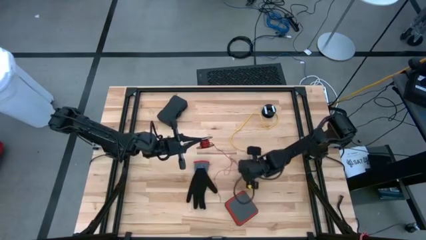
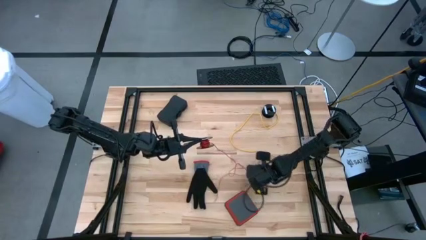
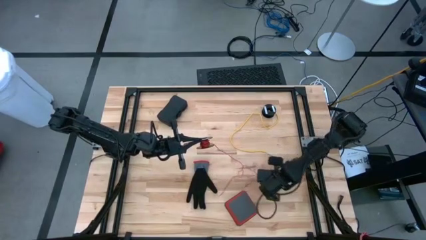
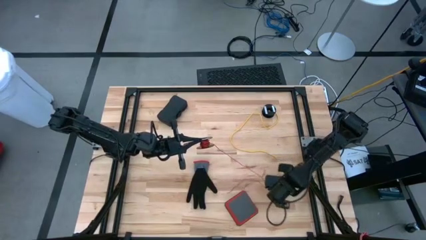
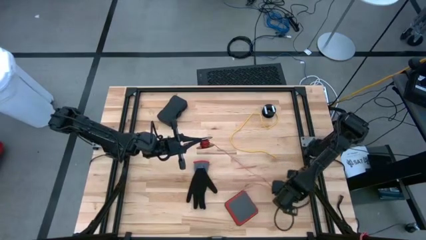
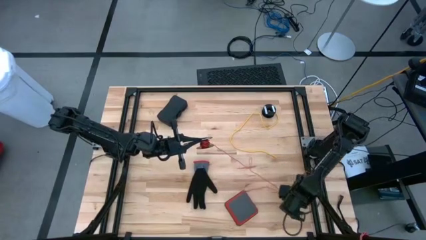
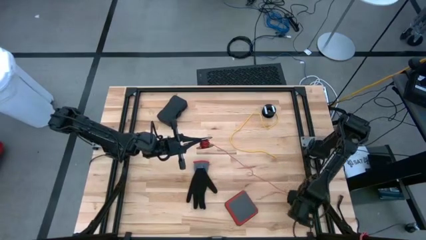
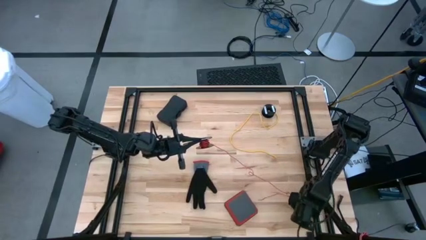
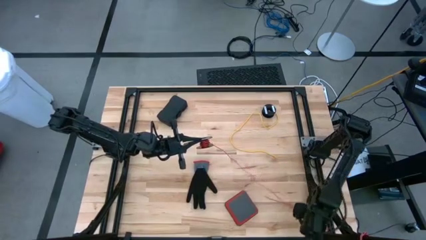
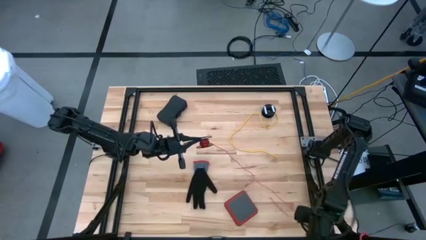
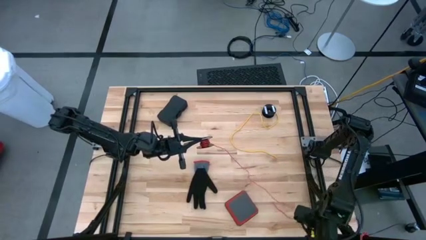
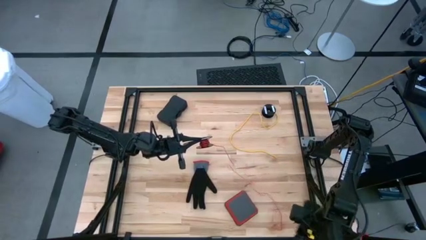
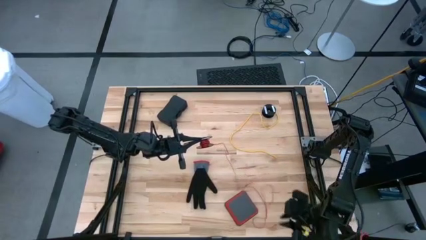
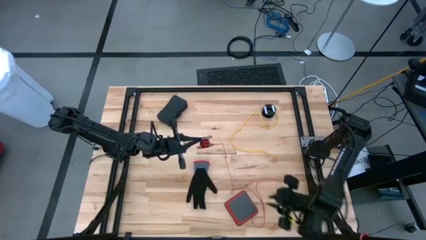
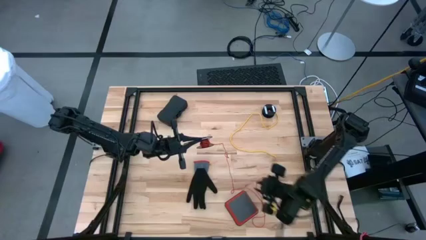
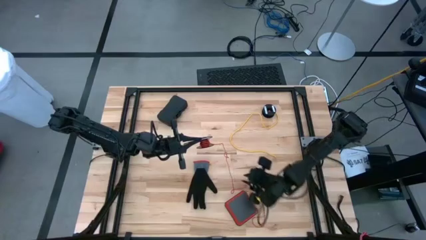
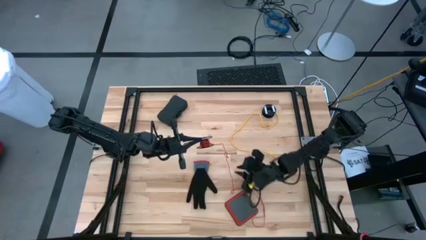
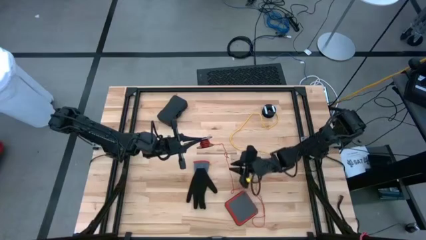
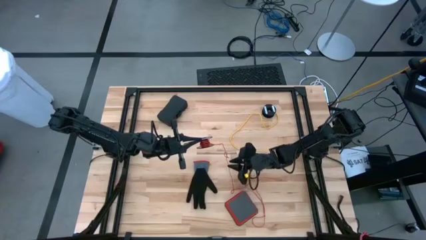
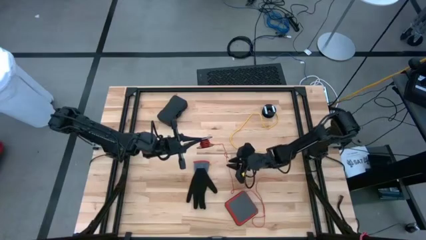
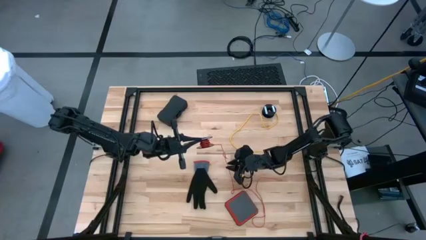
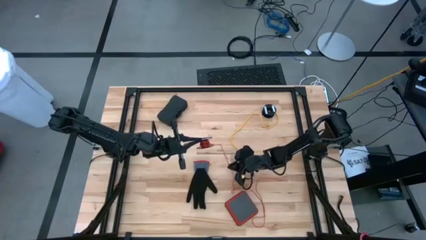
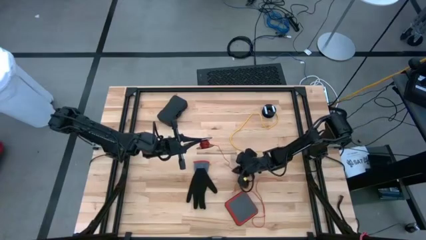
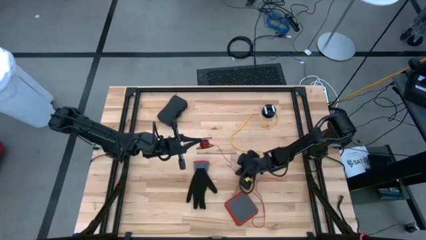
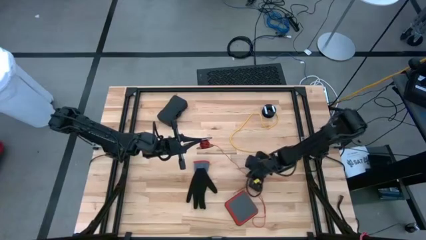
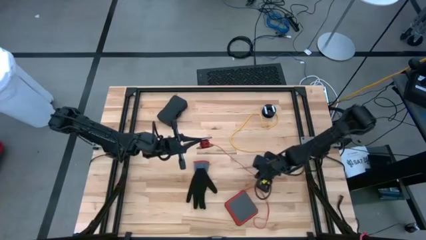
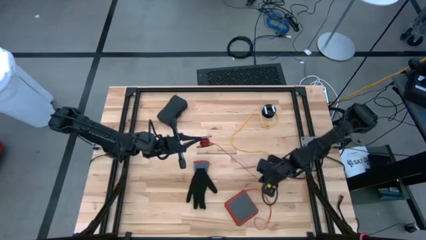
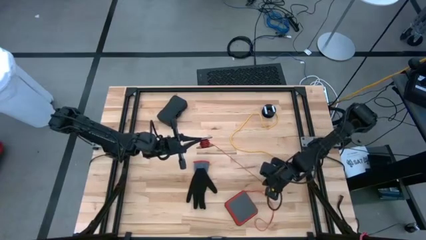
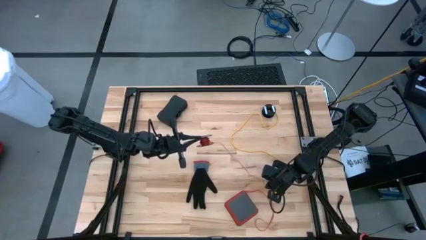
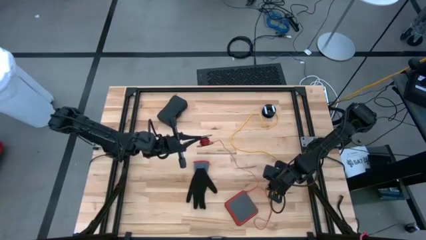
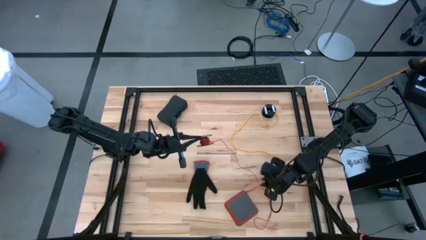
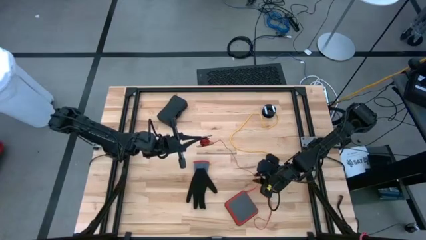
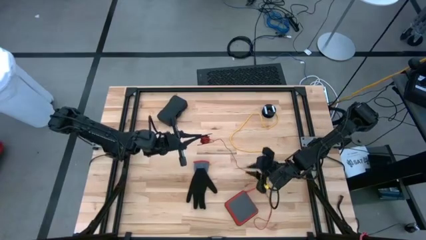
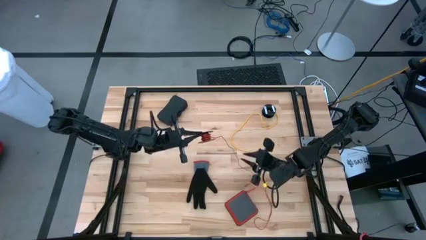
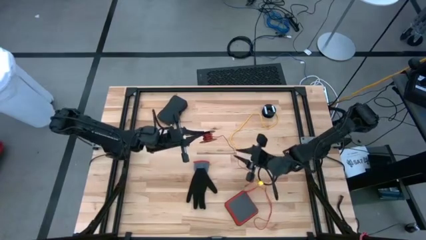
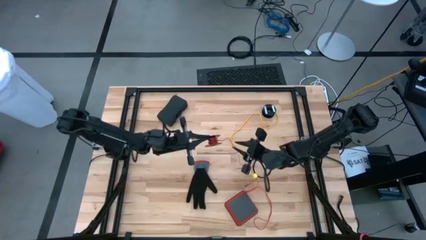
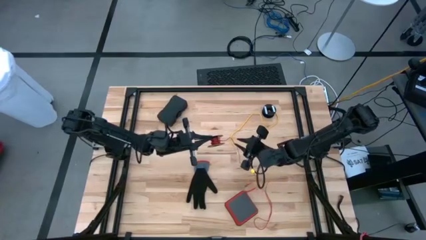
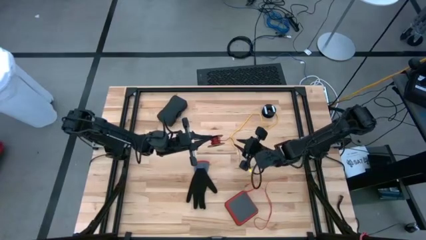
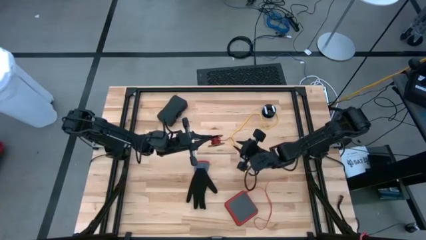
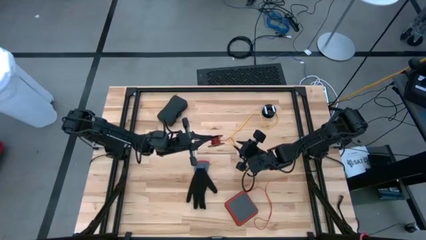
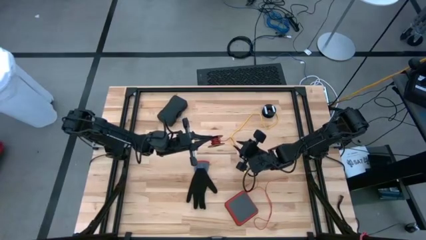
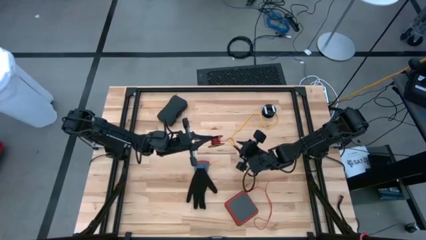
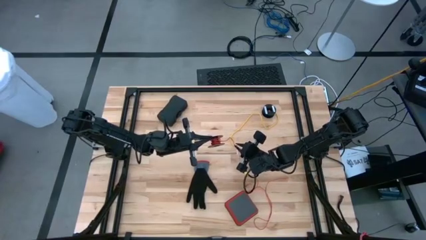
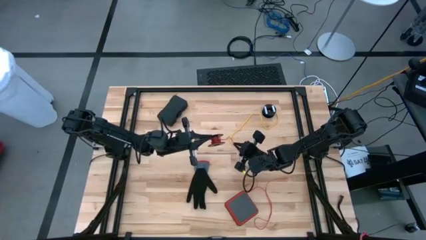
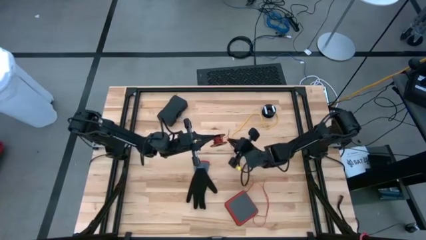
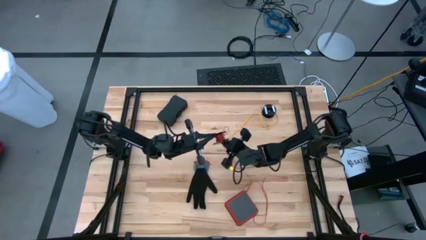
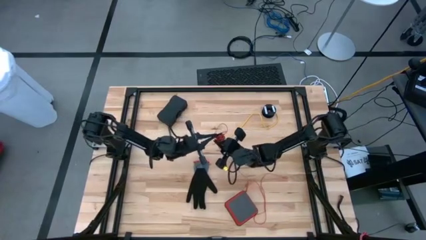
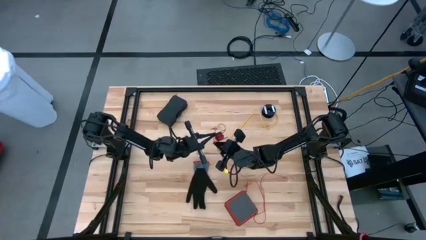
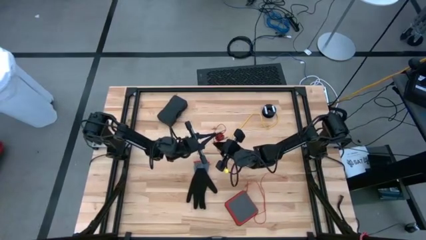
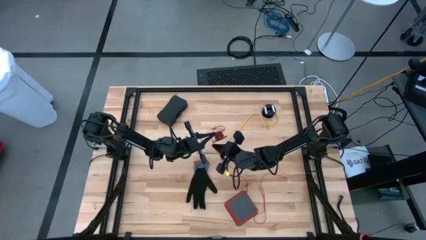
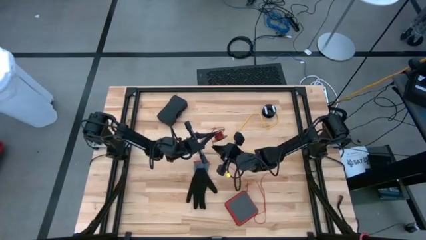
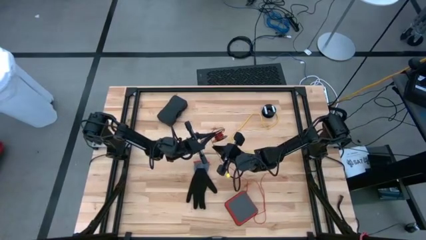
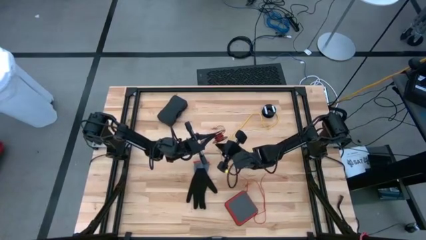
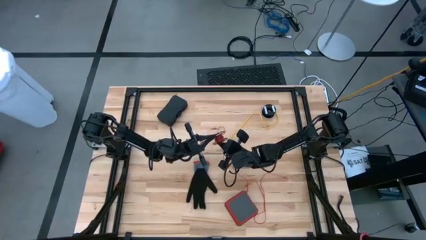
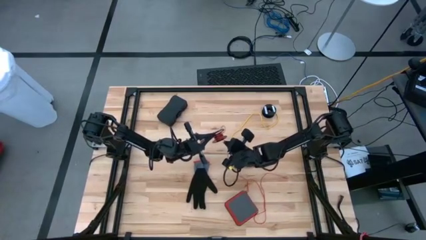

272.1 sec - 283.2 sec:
Task: Coil cords
Coil the red wire onto the black spool

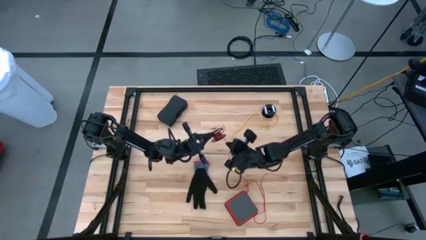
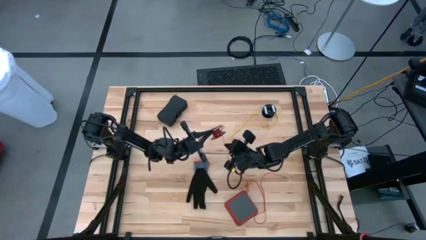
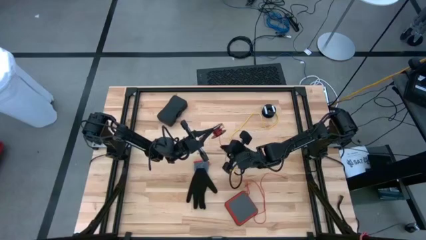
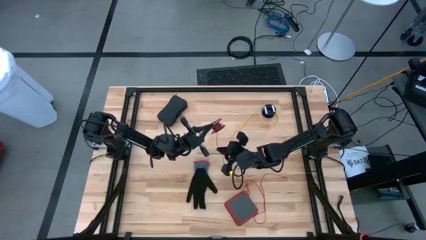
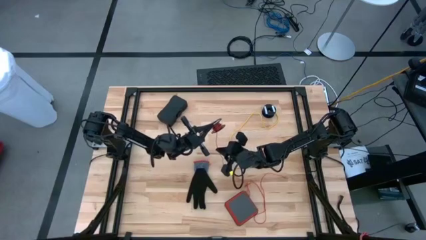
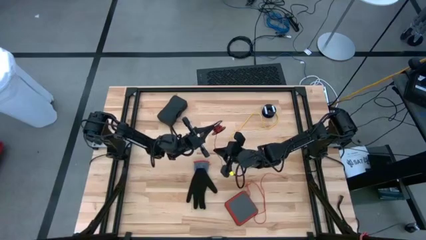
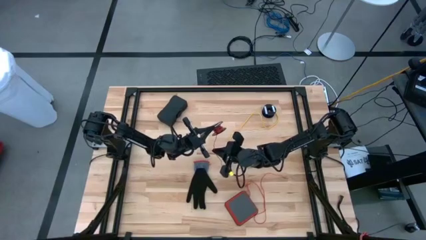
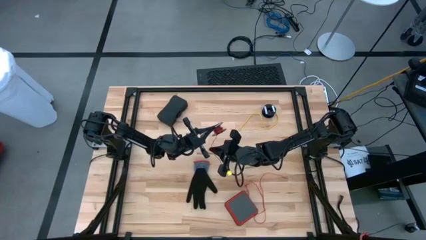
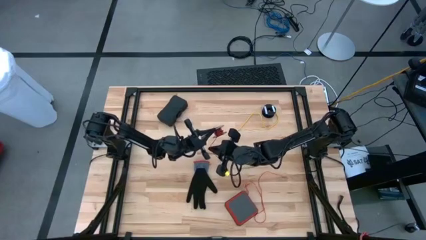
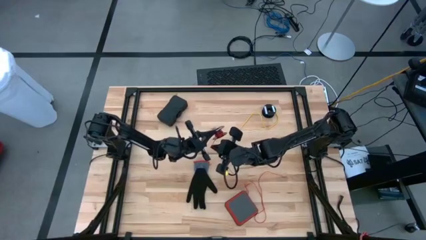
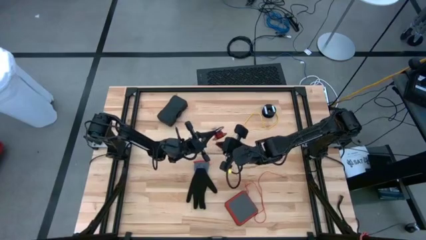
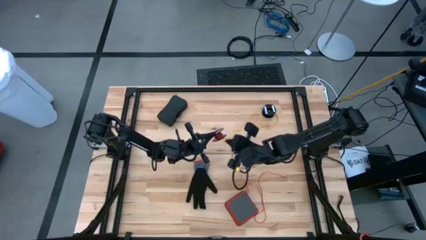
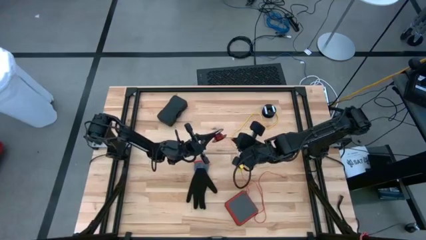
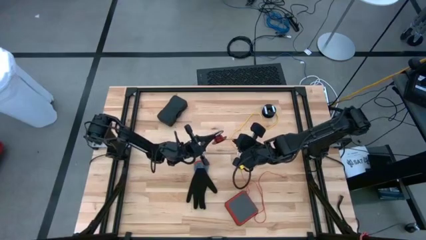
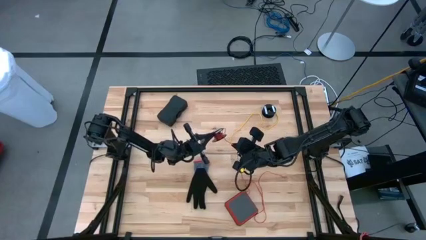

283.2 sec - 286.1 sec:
Coil the red wire onto the black spool

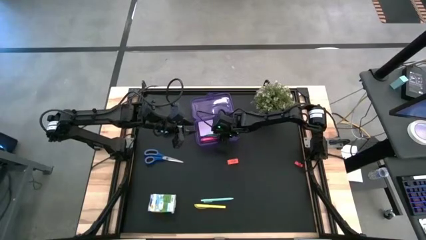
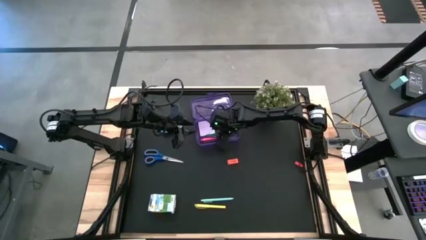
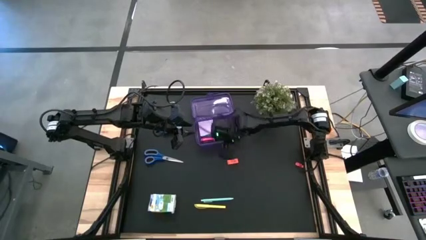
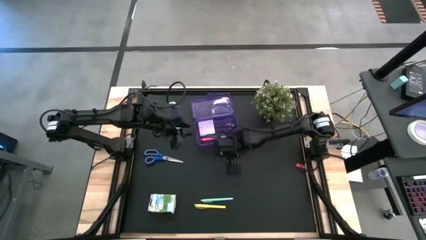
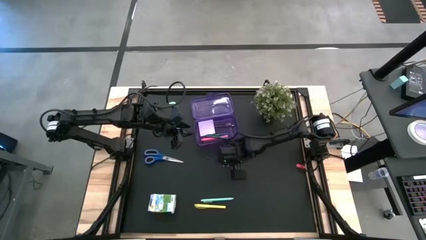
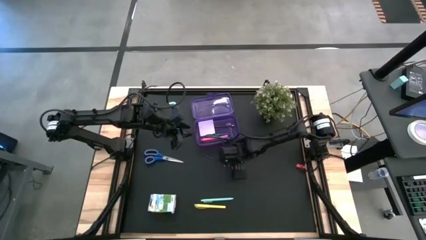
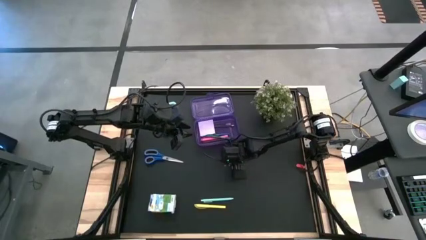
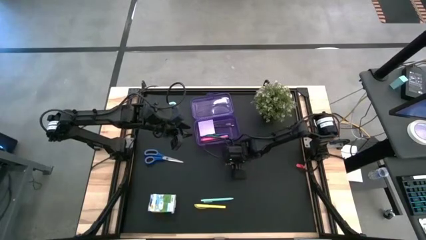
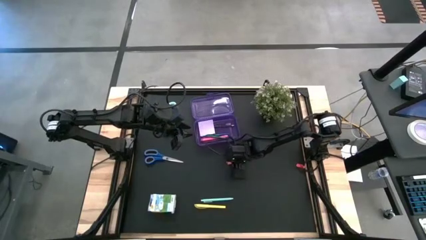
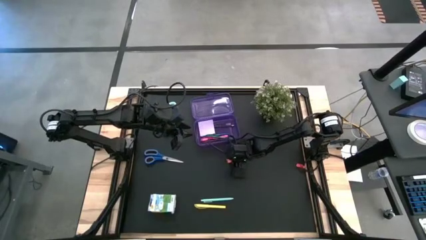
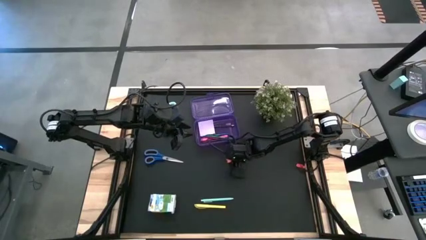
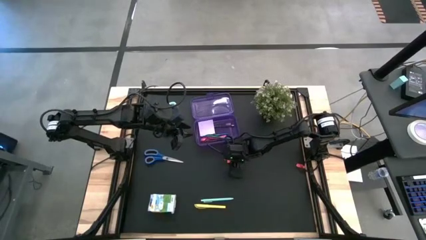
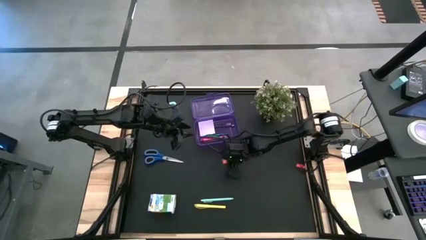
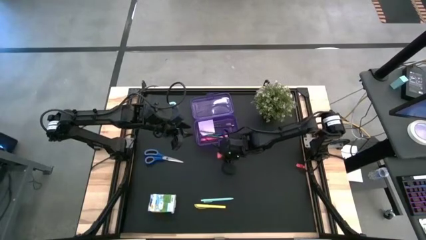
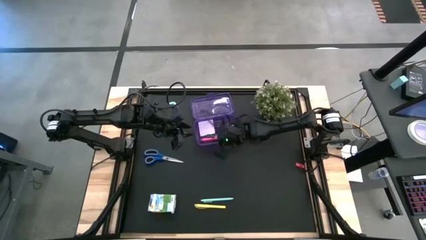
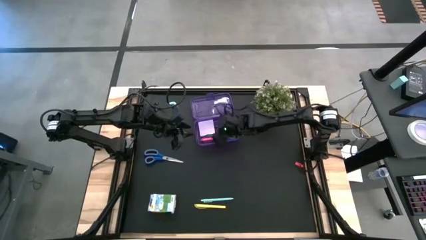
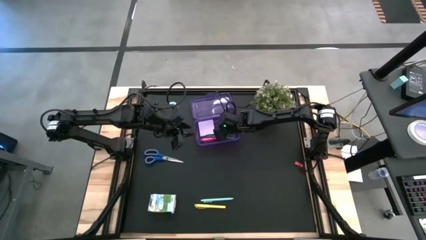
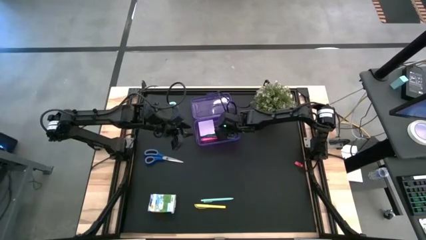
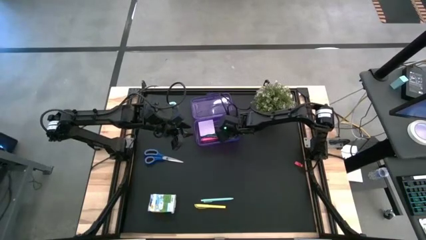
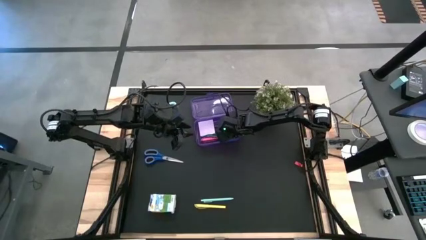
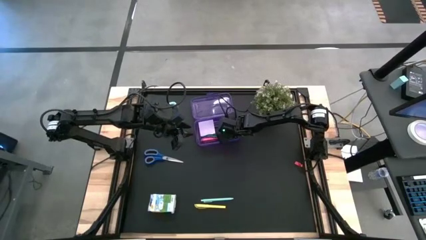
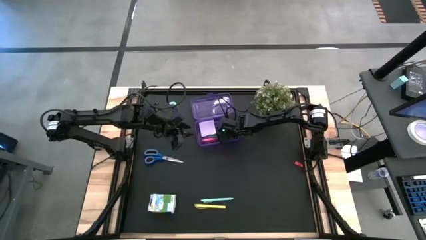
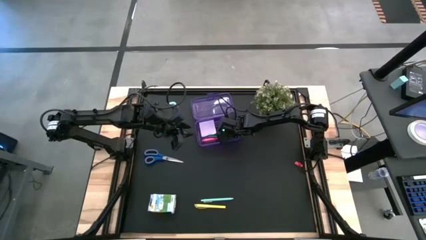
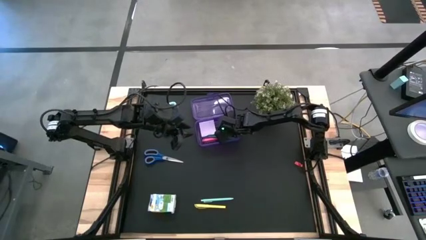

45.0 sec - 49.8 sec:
Task: Pack school essentials
Put the yellow eraser into the purple supply box
